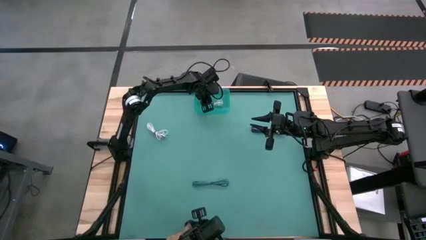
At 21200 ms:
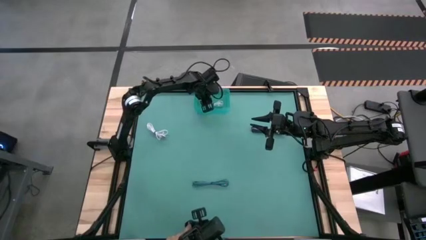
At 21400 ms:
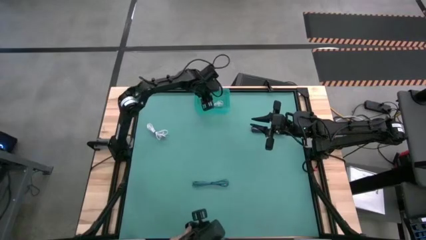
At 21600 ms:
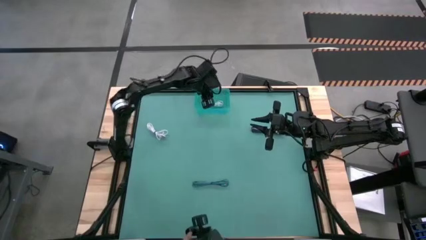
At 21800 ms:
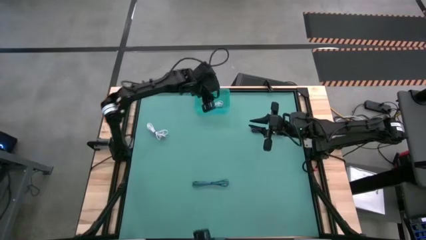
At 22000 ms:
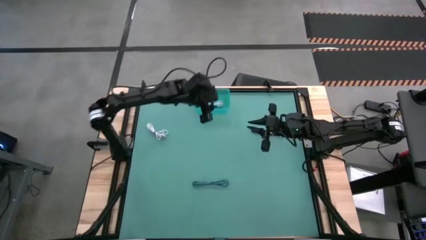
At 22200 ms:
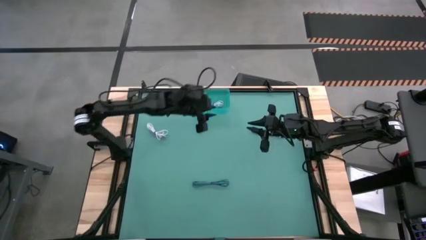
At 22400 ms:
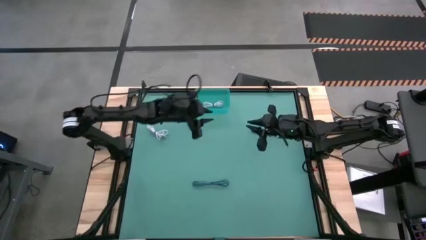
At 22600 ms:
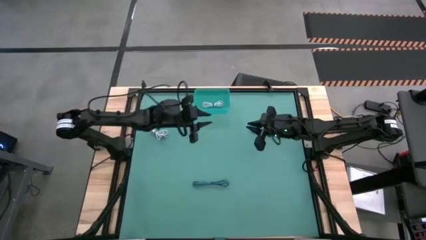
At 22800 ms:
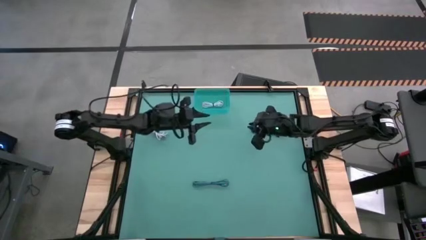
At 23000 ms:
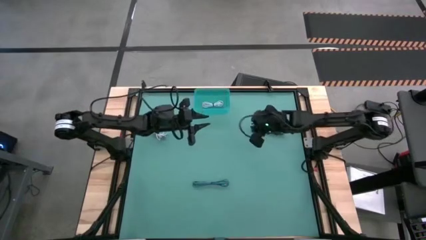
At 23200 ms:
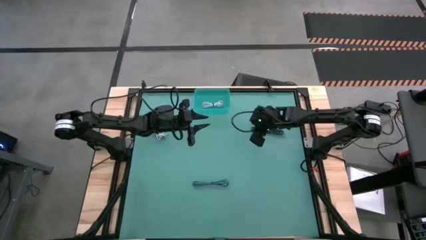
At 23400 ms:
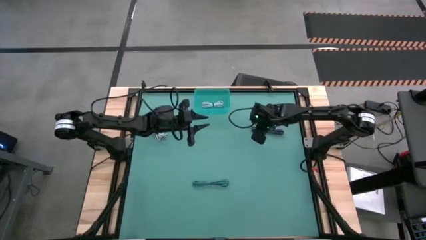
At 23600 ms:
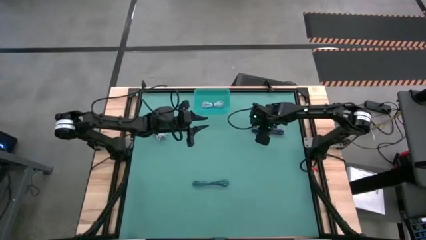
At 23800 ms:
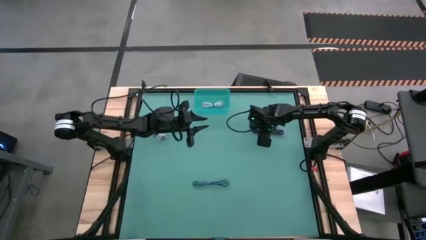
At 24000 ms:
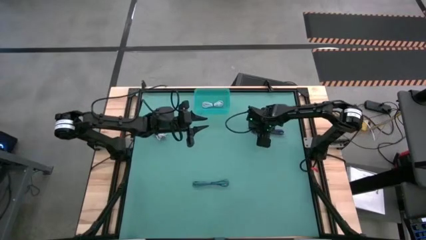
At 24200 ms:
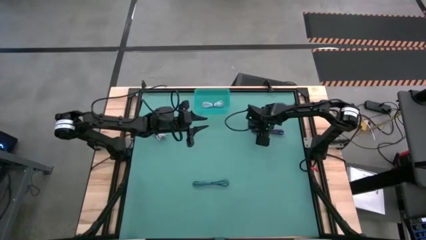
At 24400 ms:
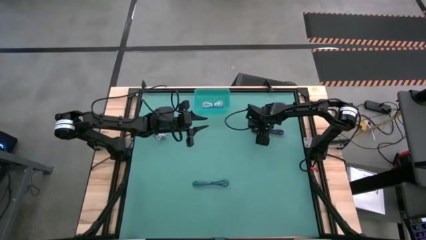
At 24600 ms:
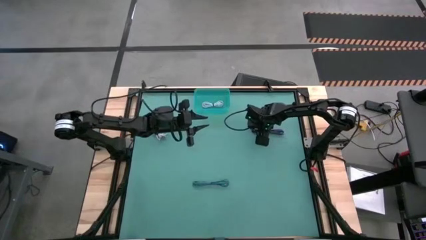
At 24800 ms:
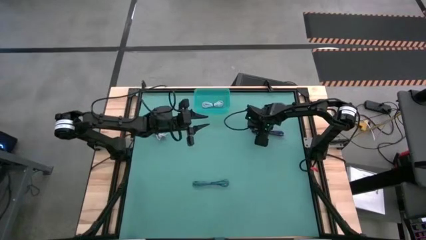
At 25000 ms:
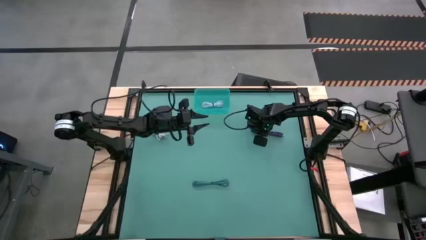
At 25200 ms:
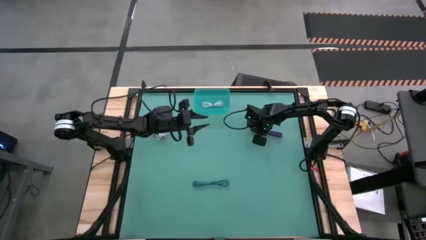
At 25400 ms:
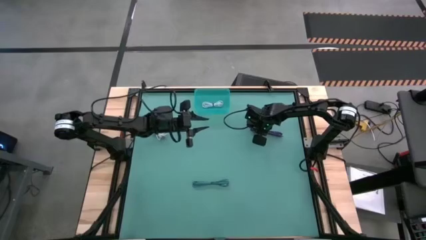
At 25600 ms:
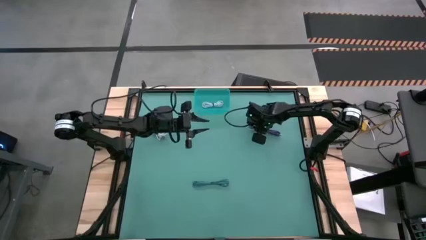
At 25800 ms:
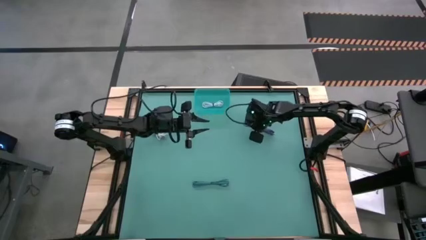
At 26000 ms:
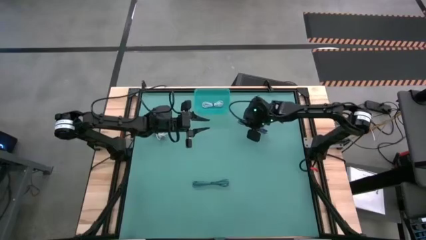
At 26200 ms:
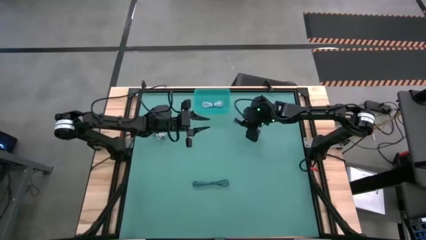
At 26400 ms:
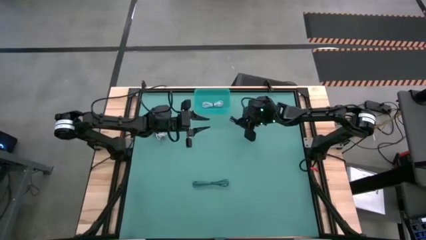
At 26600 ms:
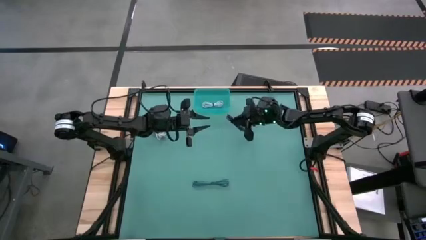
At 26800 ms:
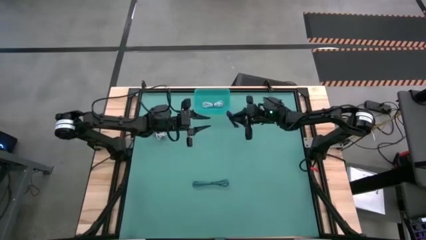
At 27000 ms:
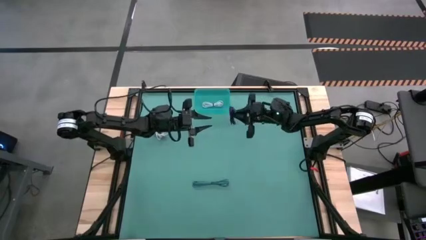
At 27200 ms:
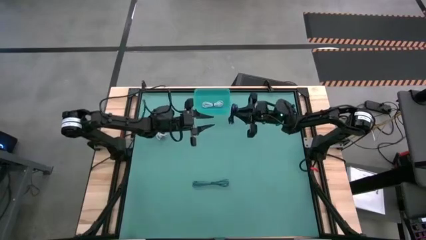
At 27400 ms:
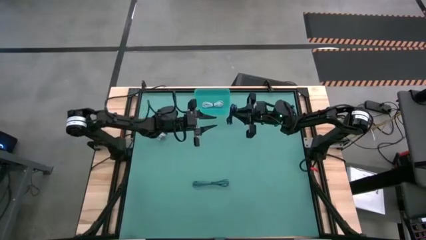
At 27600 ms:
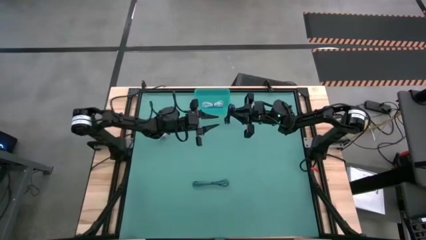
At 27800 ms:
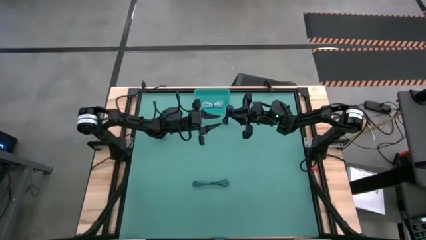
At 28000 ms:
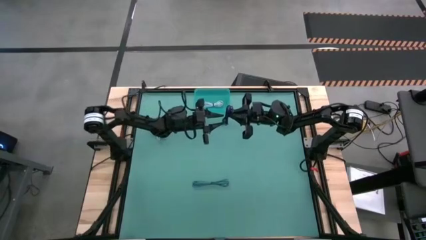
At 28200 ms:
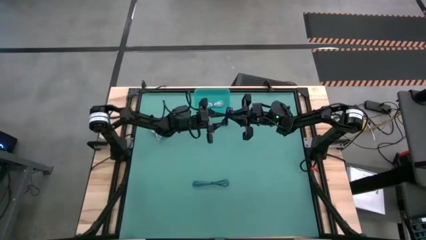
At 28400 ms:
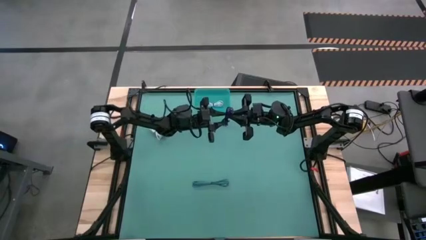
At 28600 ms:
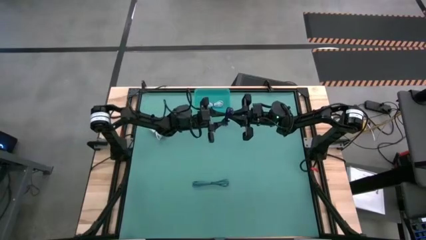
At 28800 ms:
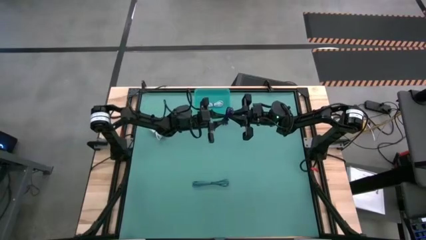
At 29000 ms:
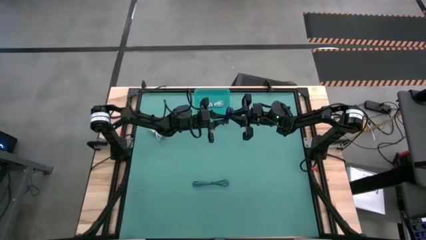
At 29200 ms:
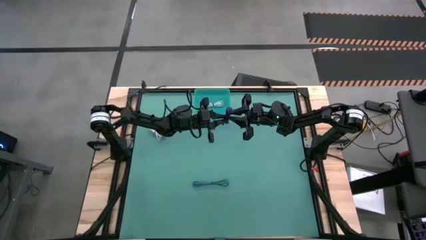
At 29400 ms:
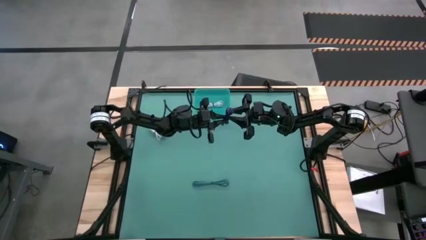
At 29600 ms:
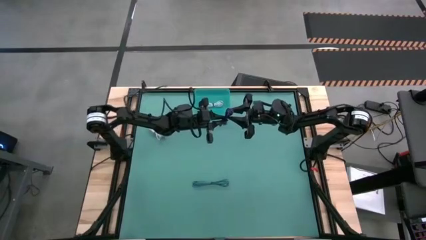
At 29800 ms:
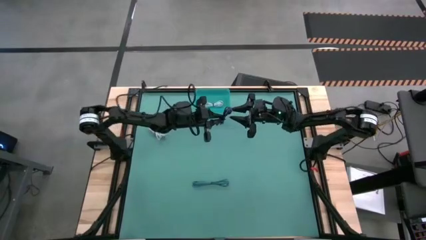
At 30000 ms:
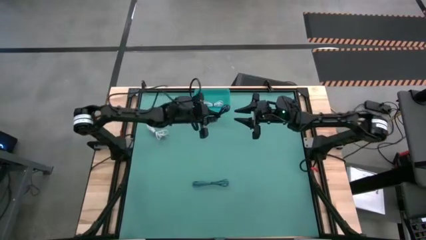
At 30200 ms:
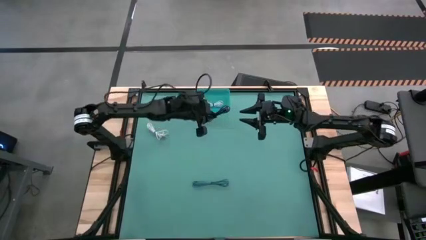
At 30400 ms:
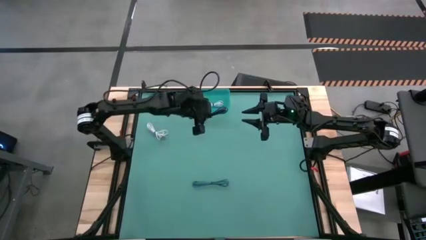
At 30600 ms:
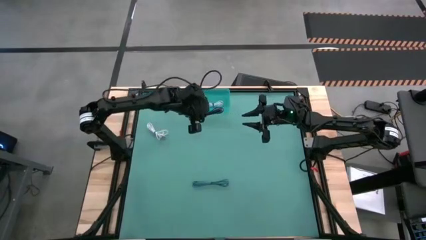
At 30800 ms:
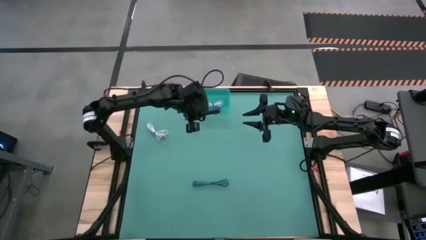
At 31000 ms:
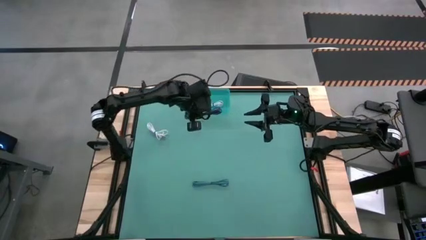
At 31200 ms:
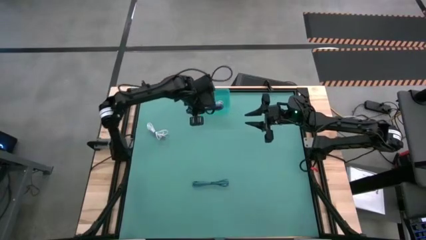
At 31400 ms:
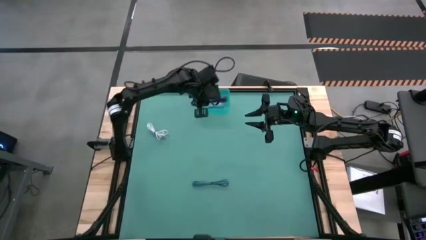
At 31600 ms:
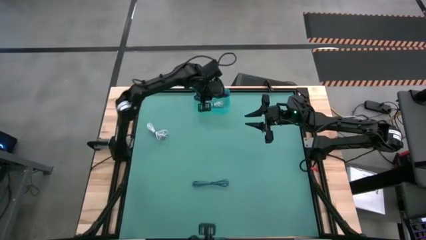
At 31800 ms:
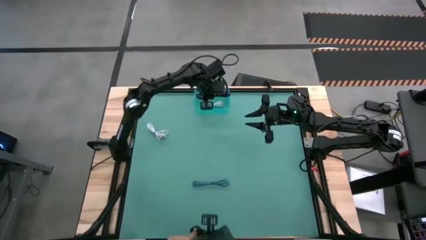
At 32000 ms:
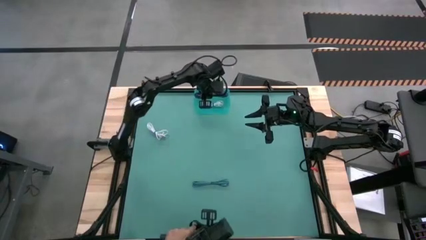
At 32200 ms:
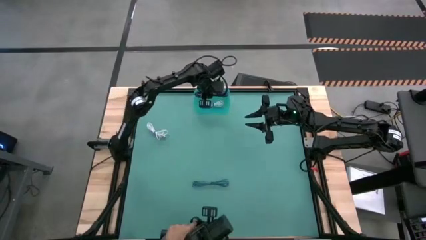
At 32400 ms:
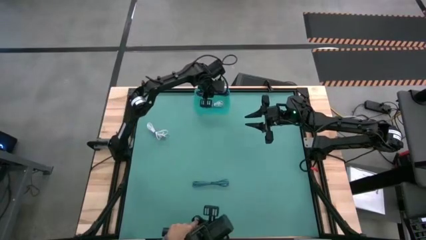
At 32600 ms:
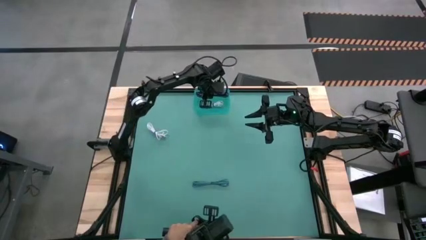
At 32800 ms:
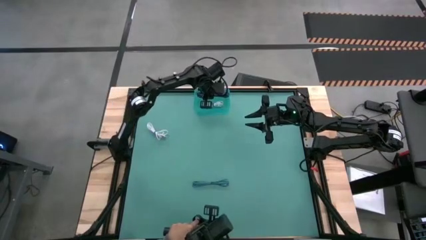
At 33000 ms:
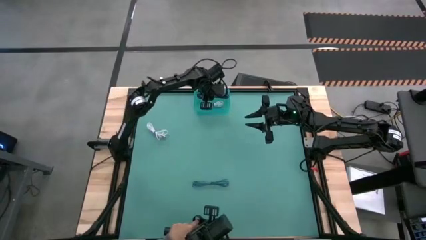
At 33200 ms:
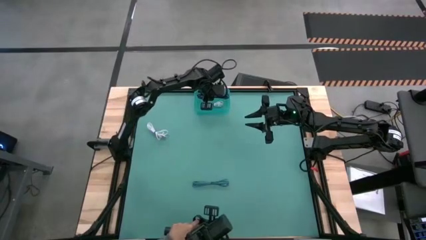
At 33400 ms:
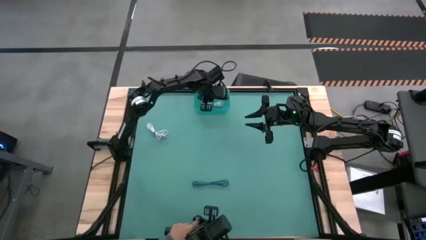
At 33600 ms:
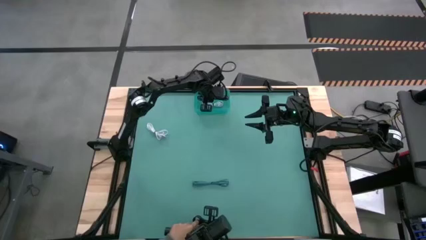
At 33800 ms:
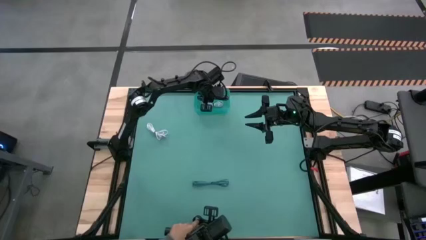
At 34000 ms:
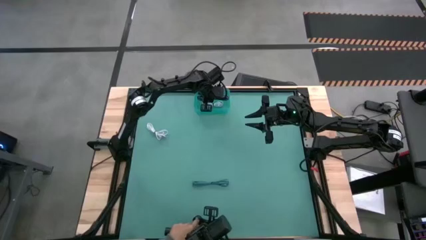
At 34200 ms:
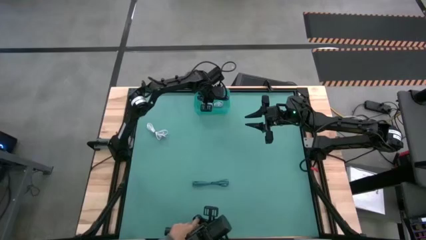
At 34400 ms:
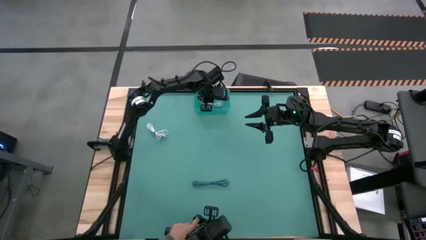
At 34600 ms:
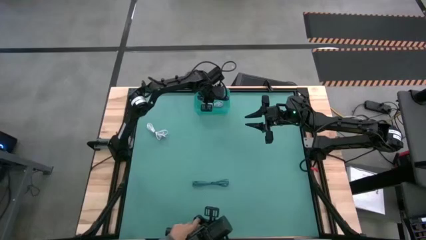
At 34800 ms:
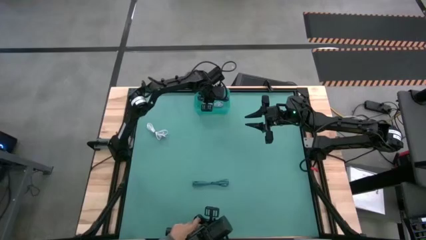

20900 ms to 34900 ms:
Task: Pick and place USB-C Cables
Put the purple charger cable into the green bin
